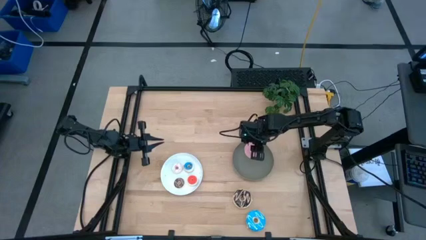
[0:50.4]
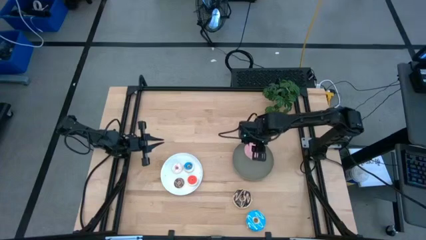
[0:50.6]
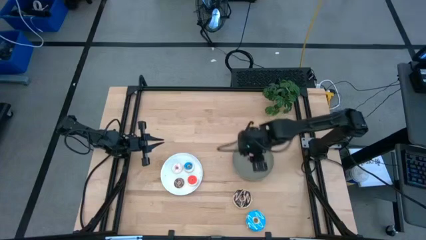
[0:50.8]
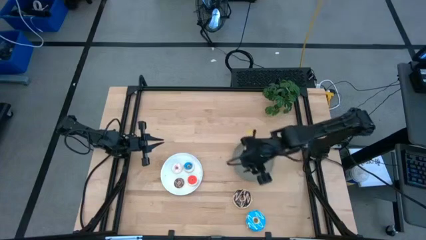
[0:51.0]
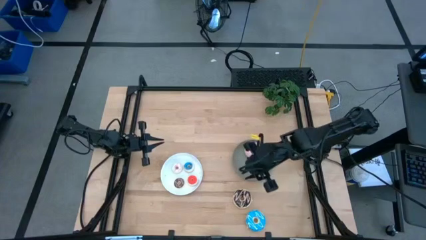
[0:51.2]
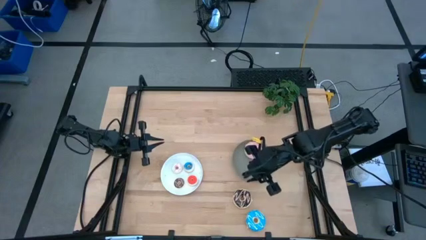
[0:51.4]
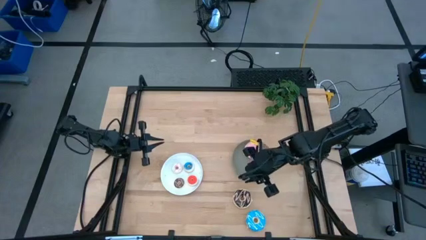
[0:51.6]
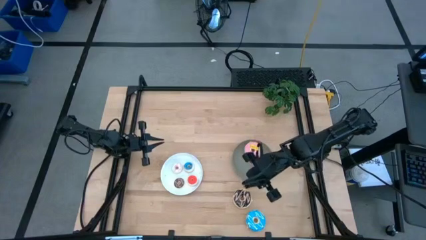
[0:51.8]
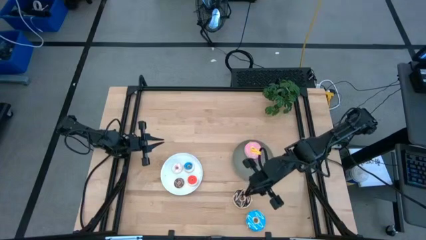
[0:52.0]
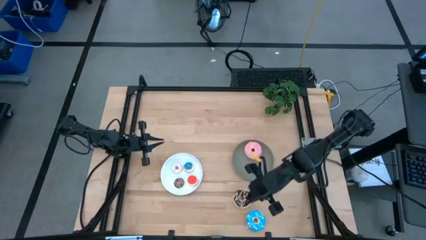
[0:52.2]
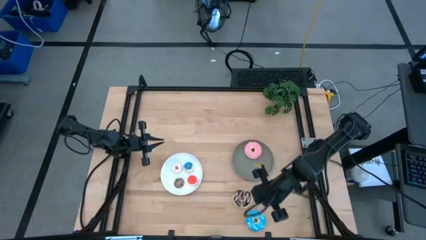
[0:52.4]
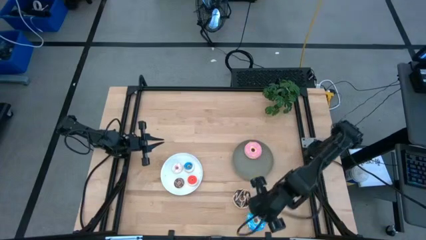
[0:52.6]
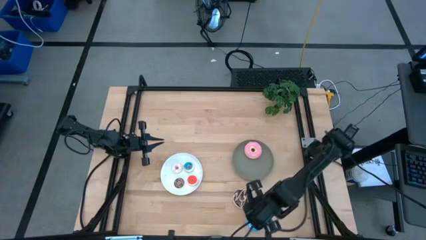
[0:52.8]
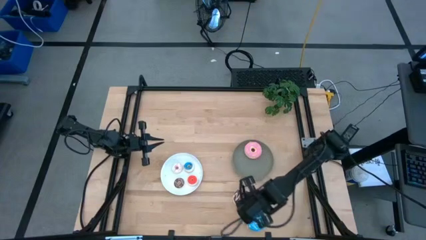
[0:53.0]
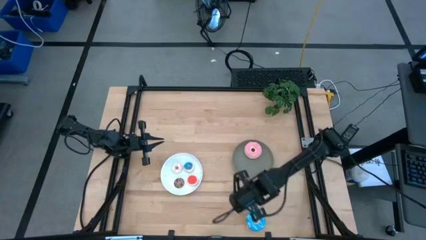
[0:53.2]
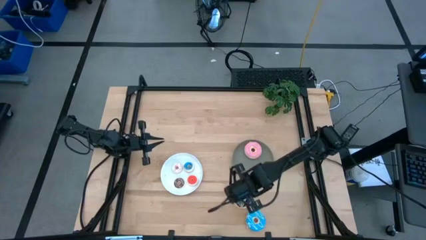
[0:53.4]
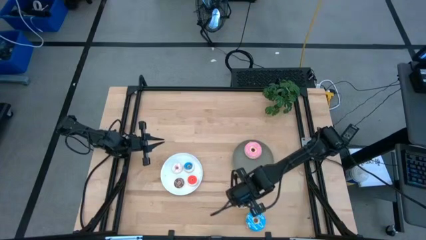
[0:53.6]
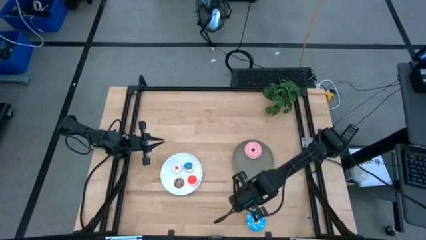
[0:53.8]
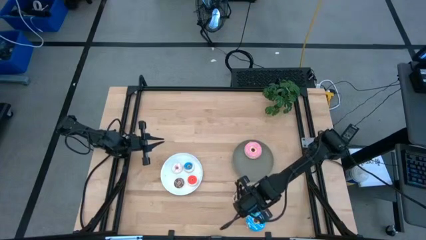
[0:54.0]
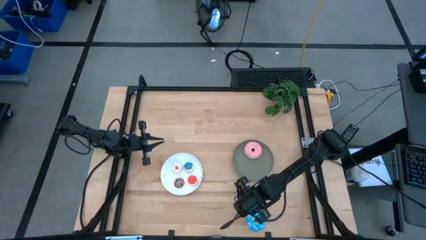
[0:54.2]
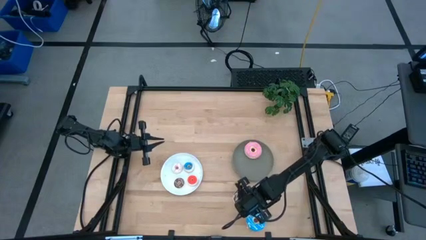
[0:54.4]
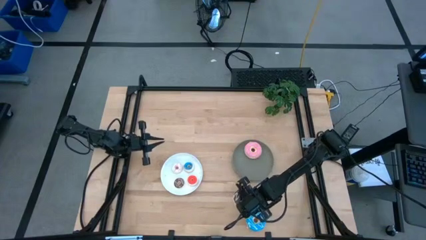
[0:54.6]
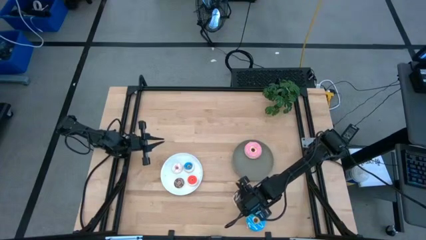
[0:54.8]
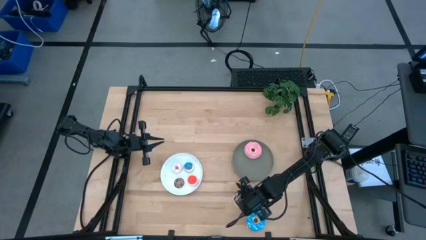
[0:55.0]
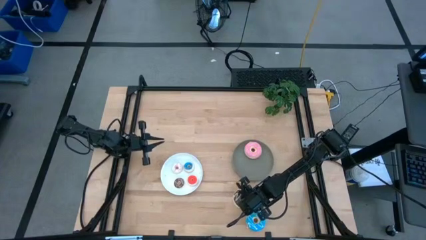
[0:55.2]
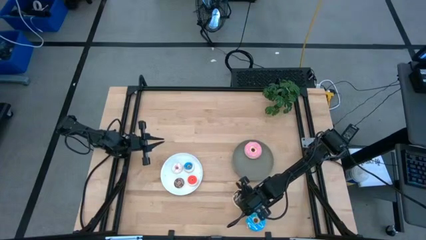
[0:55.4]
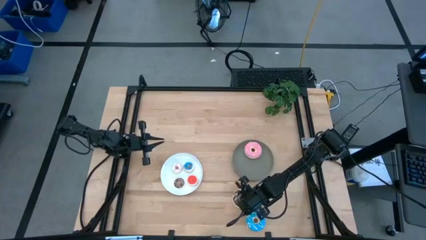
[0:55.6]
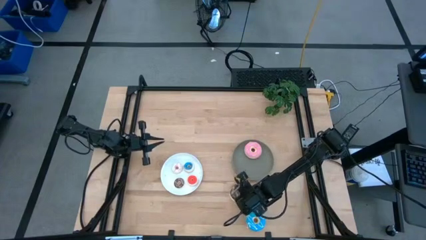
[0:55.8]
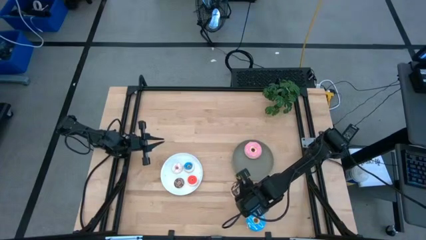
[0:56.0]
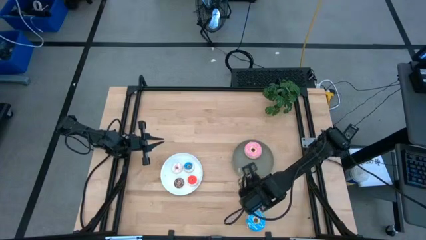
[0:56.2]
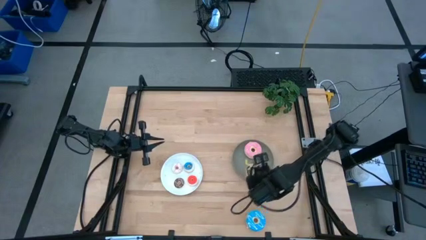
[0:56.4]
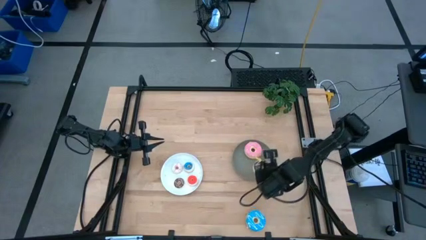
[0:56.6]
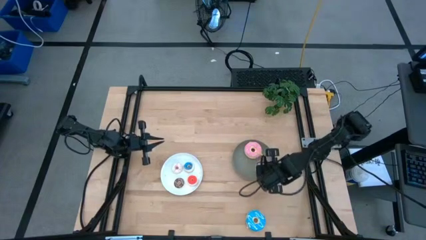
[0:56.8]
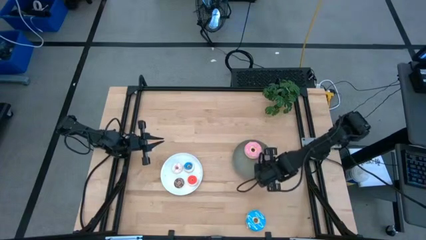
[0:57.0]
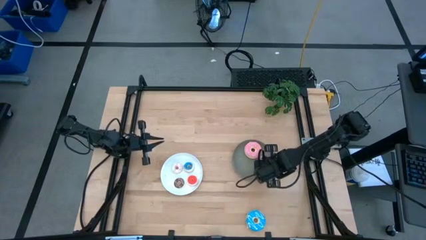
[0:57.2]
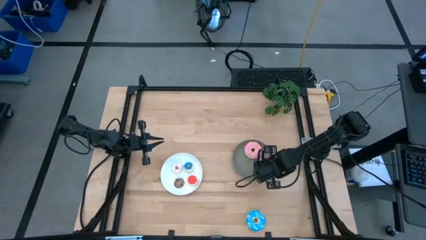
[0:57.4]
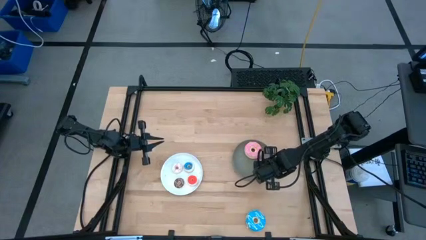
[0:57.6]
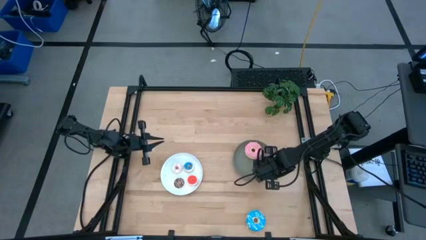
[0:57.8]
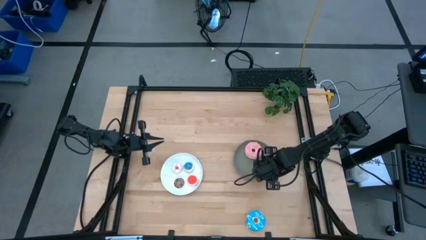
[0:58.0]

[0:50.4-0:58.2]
Task: Pick & Place donuts
Put the large black donut on the gray plate

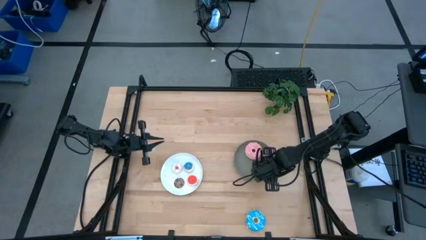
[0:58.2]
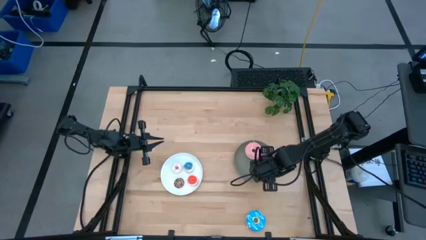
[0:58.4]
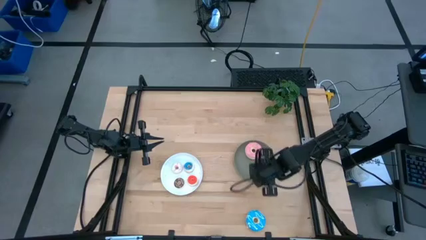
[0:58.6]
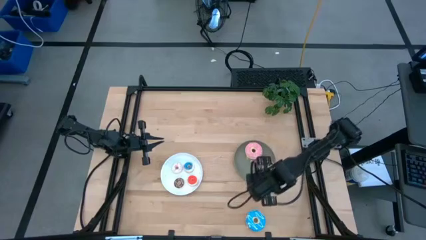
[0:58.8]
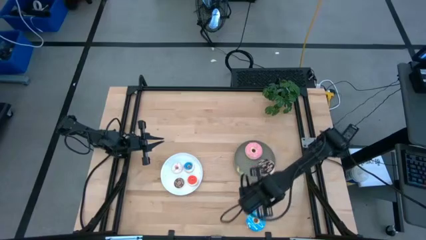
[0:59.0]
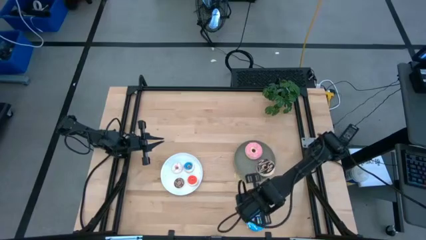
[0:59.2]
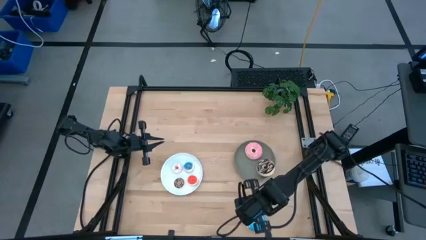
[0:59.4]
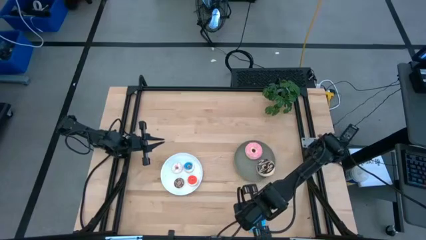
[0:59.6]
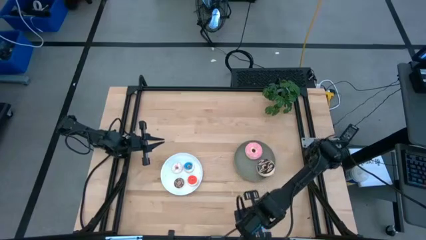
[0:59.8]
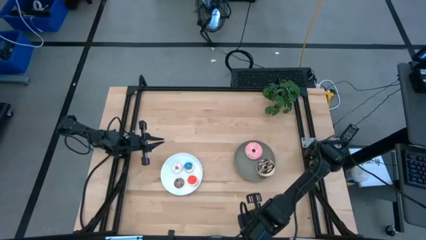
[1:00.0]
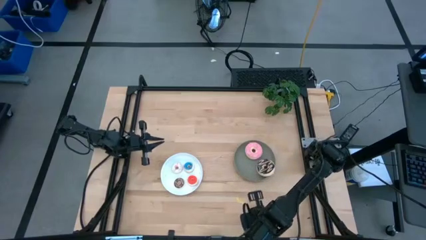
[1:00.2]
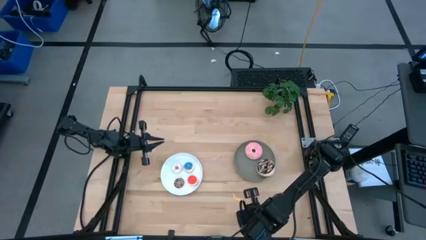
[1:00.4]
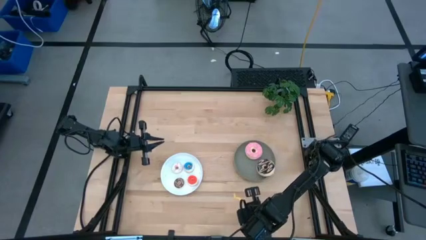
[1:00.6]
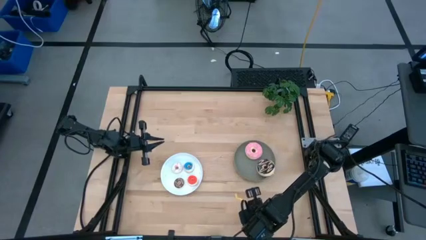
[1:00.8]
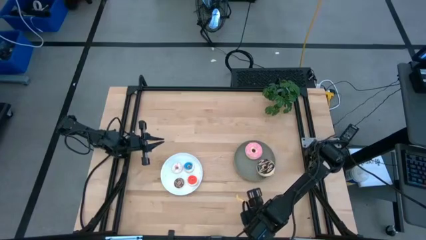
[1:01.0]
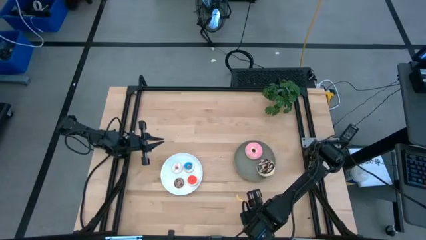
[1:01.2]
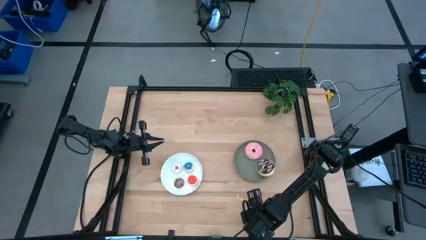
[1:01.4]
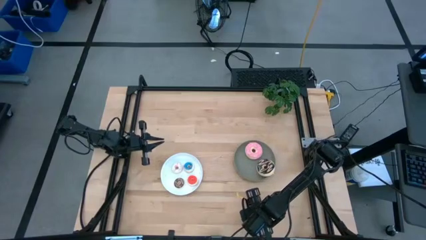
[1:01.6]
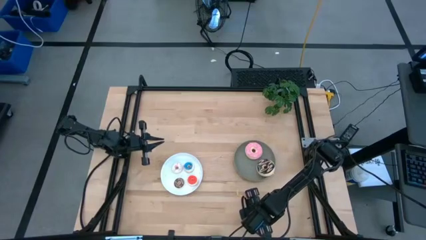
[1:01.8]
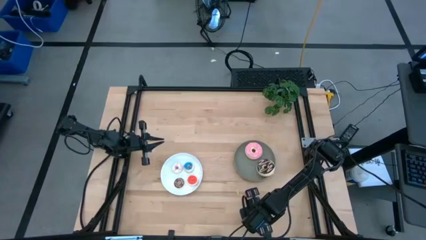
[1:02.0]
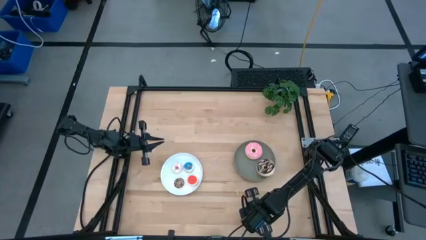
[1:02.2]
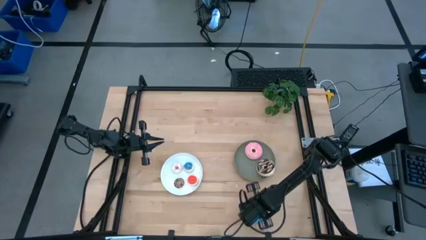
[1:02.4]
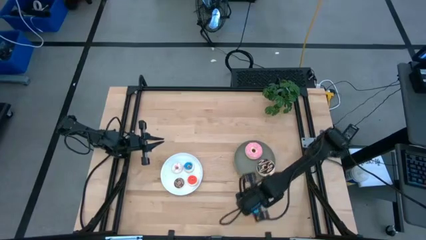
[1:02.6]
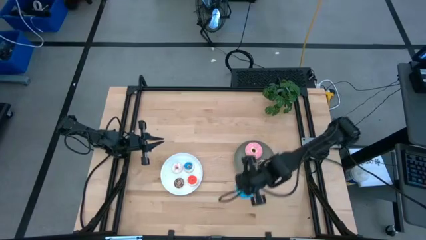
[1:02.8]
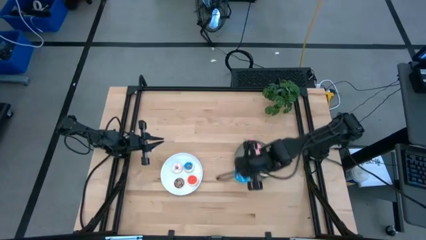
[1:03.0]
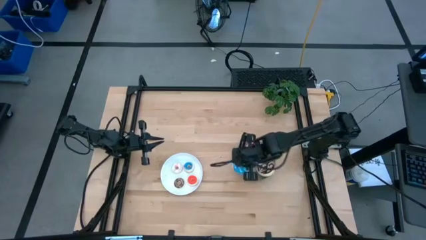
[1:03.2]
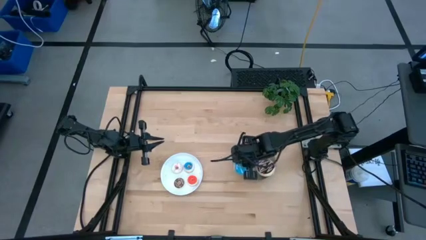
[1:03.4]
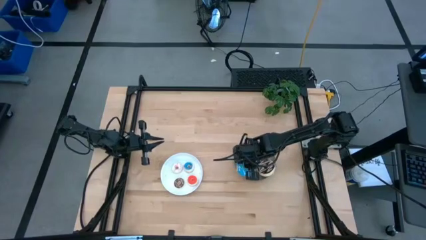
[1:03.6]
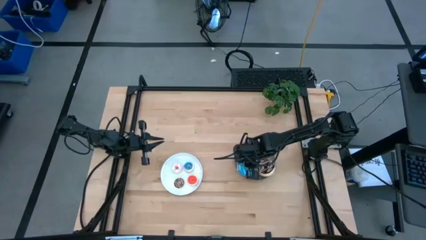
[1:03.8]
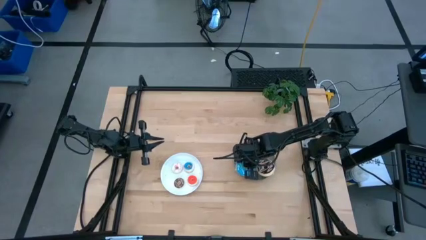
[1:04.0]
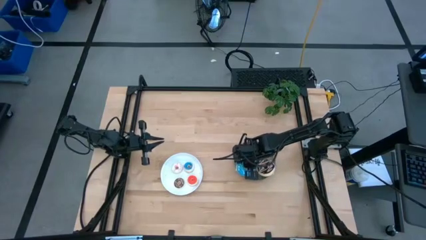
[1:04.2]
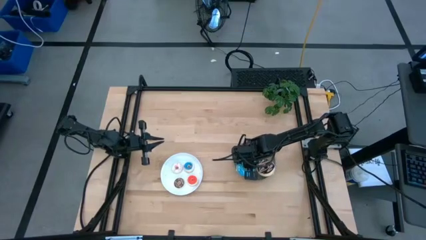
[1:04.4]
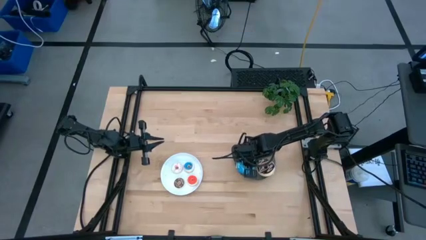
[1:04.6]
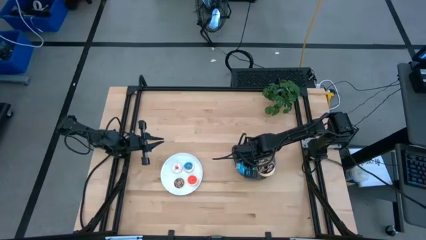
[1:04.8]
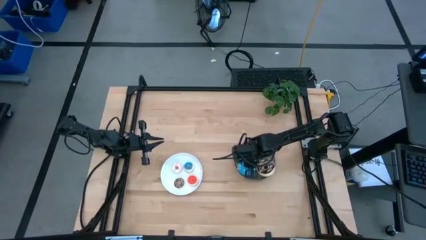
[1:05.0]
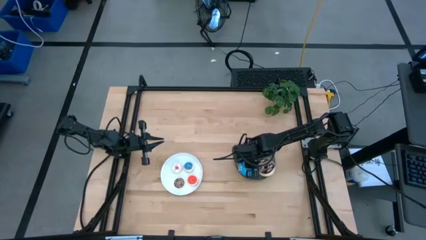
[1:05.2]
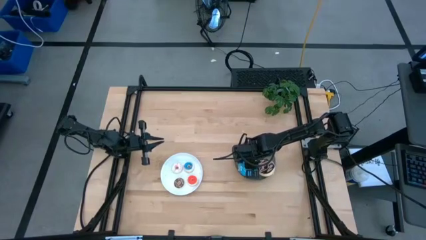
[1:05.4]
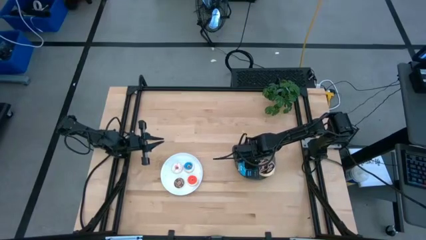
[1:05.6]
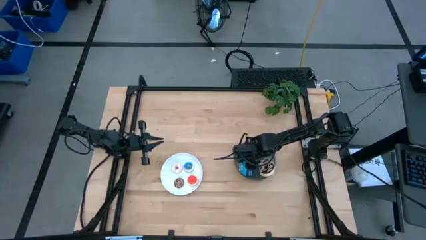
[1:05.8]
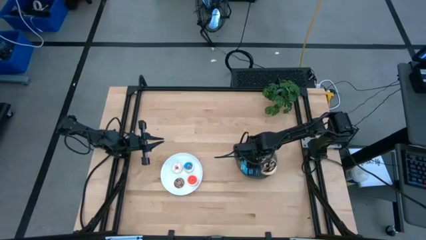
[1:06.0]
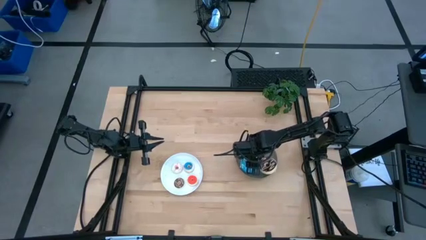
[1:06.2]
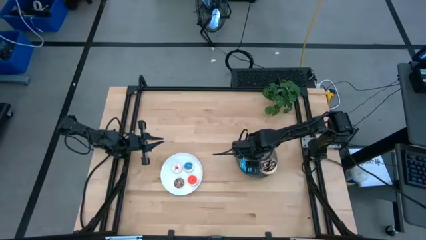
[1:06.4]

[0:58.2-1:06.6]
Put the large blue donut on the gray plate
